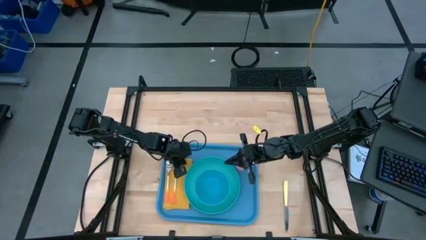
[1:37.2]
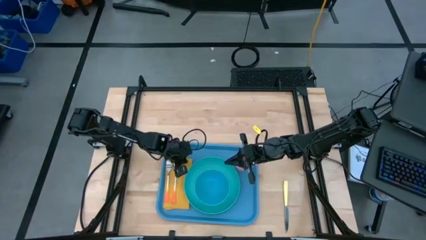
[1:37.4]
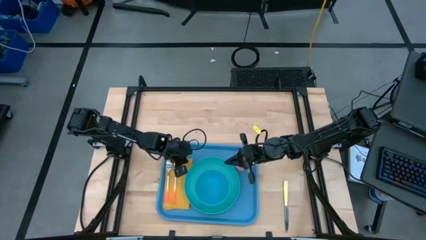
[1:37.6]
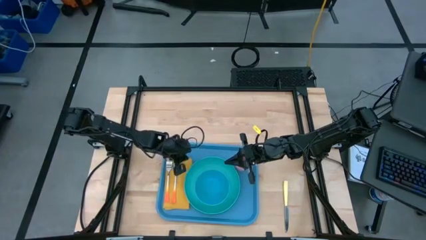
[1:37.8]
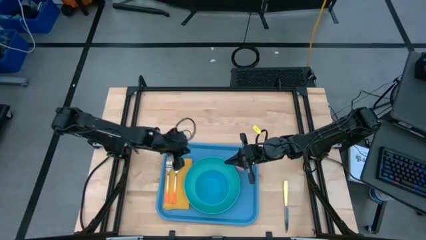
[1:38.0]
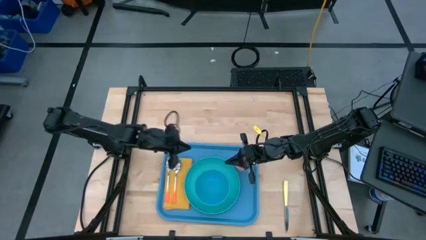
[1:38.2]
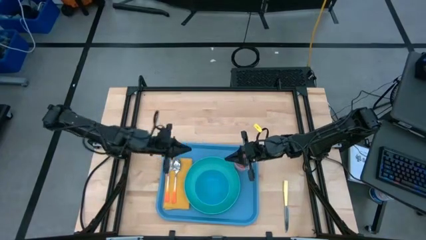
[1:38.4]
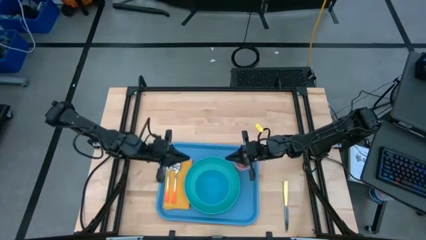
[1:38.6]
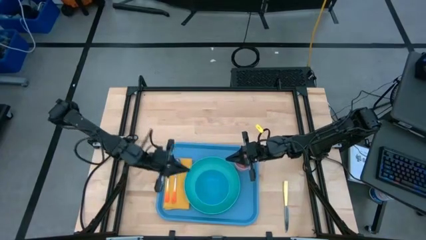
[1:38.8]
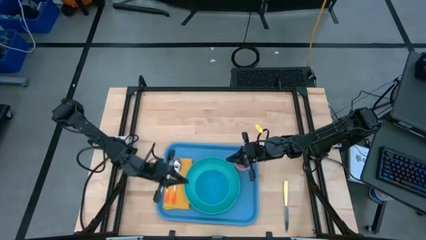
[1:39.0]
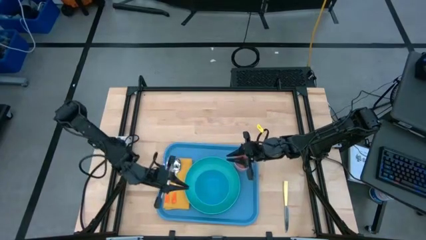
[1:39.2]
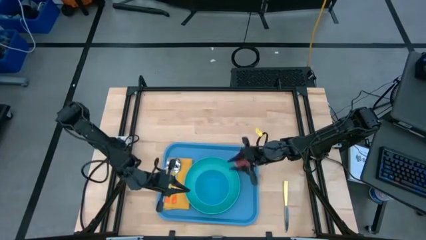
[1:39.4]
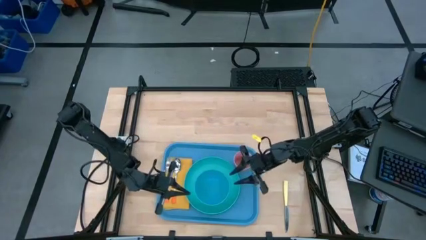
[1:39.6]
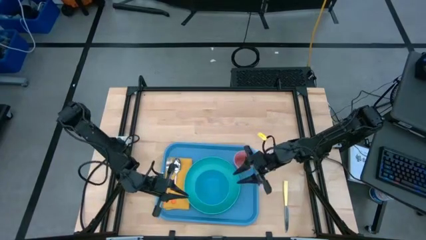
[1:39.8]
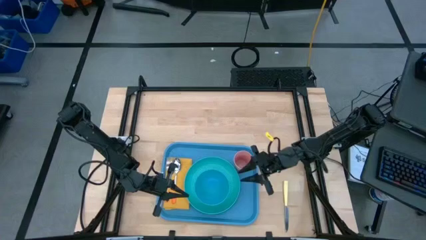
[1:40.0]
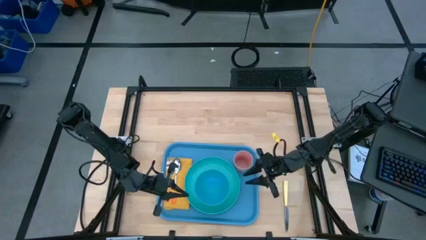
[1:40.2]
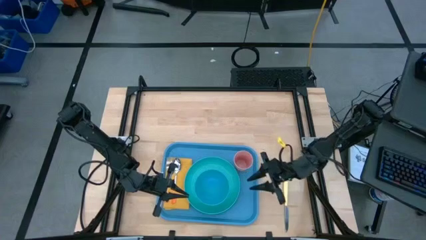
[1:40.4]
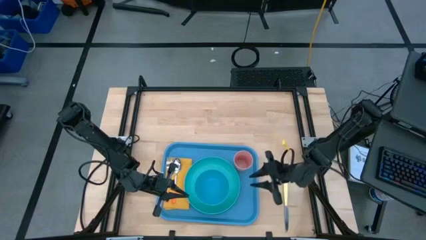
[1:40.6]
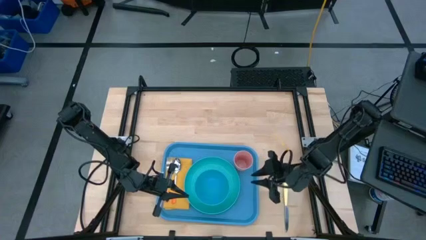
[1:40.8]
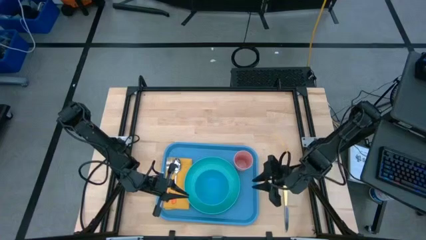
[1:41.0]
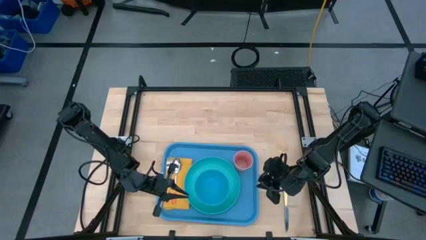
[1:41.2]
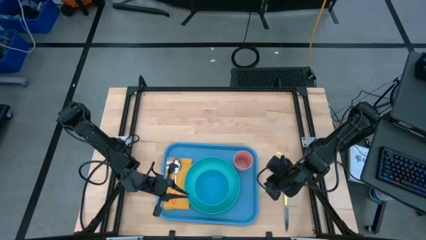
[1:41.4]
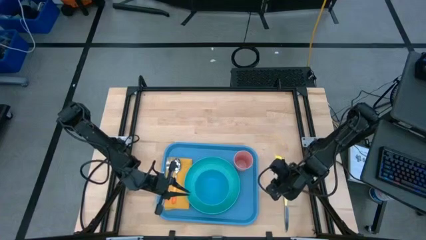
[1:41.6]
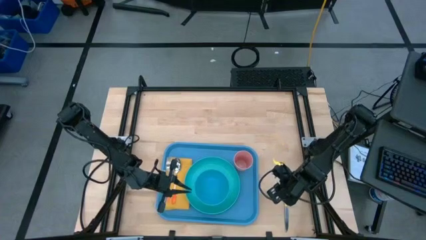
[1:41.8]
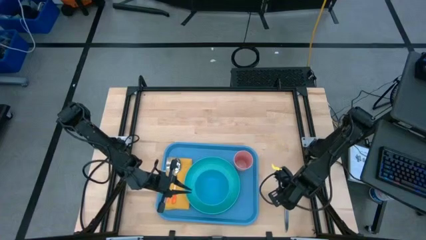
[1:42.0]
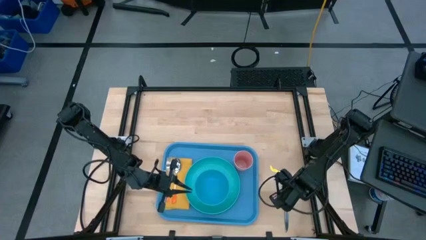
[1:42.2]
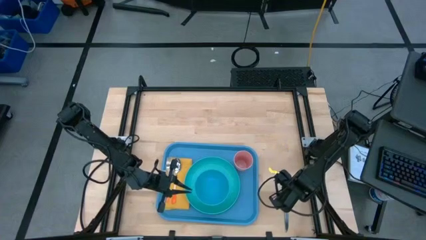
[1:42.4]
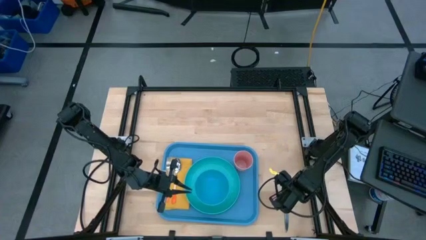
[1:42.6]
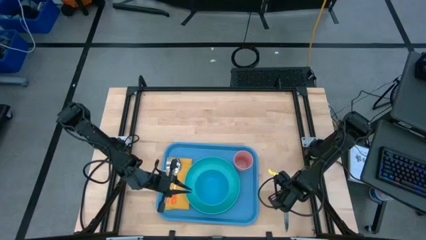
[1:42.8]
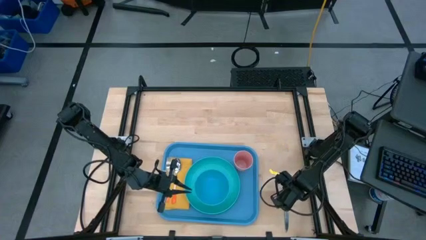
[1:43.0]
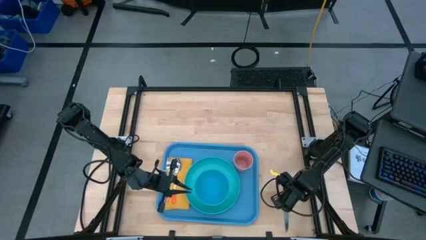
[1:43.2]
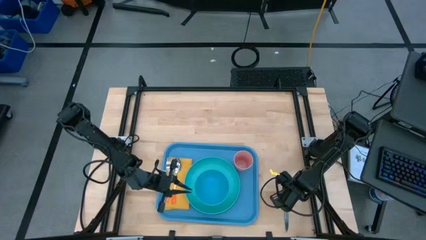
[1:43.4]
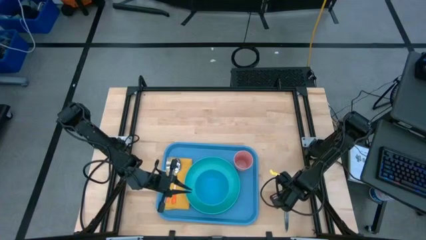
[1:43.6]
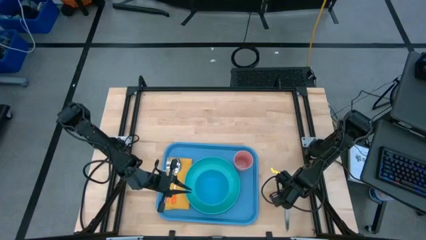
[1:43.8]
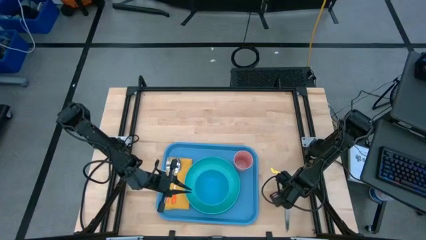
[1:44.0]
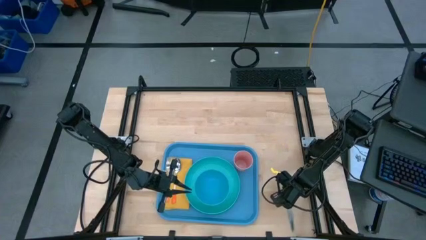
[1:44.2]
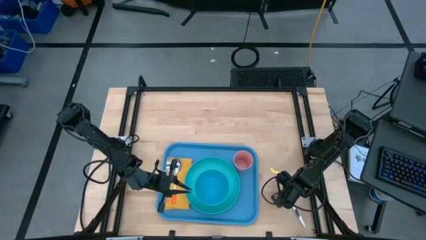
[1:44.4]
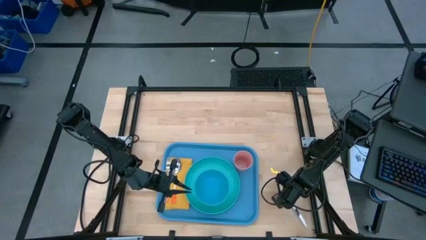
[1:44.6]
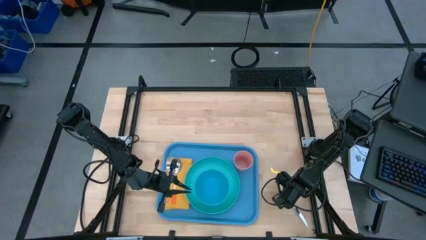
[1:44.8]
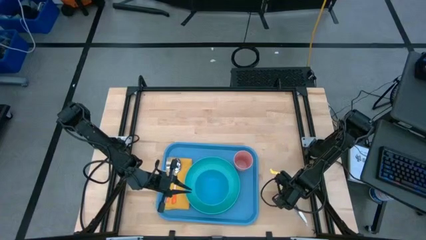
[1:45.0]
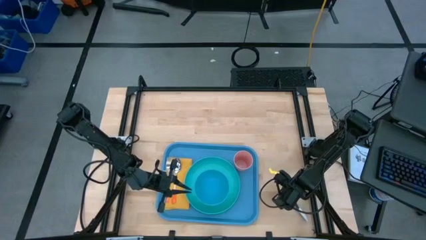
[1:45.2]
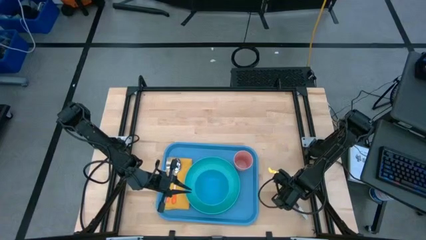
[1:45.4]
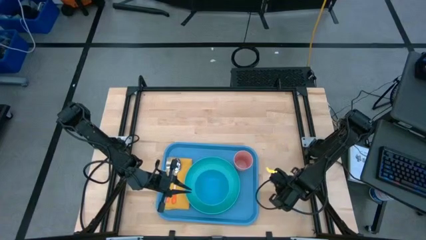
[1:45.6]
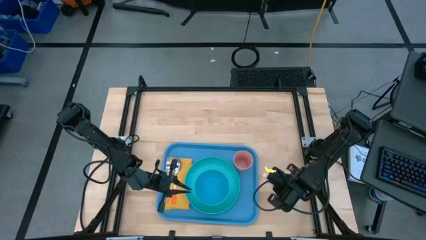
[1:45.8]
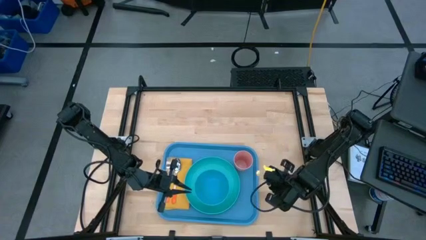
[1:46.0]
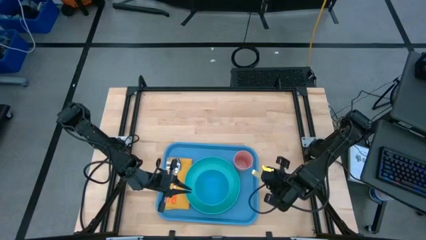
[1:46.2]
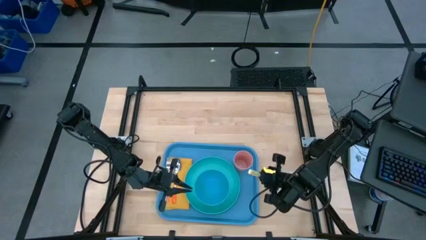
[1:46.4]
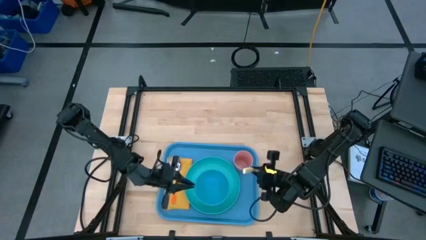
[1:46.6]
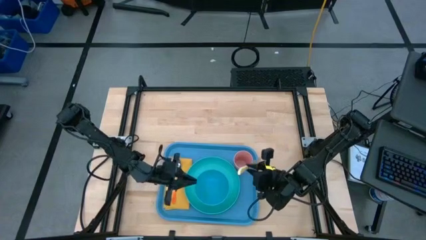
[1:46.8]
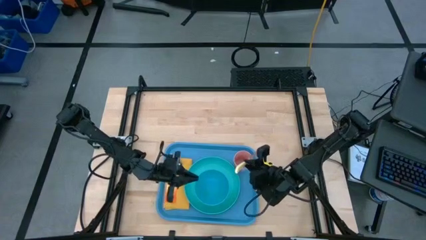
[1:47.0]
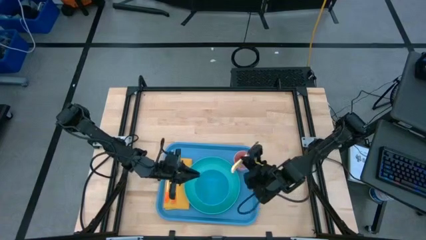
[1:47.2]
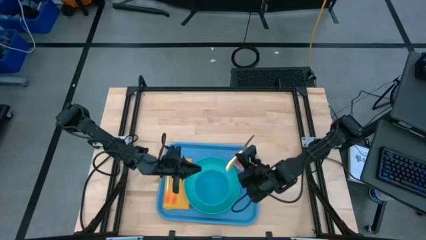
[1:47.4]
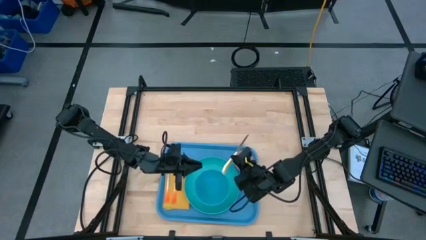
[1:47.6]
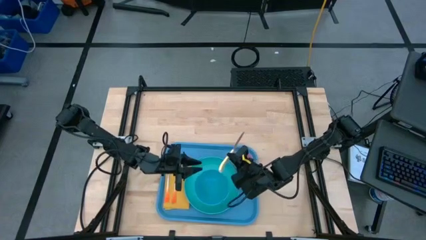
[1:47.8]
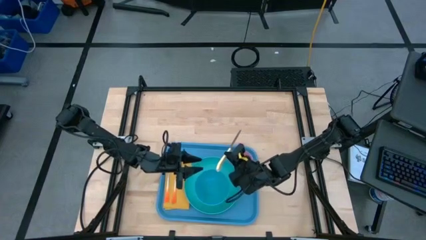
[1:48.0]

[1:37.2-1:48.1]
Task: Set up tray
Put the yellow knife on the yellow napkin to the right of the orange spoon
